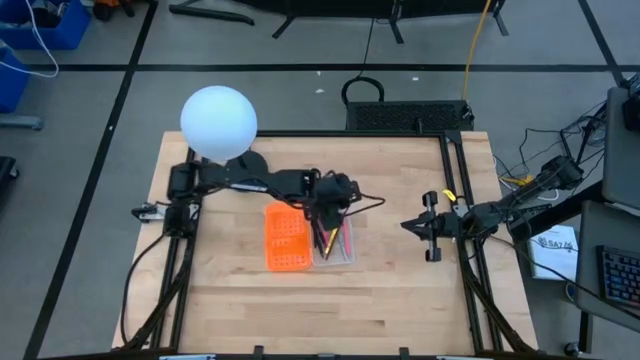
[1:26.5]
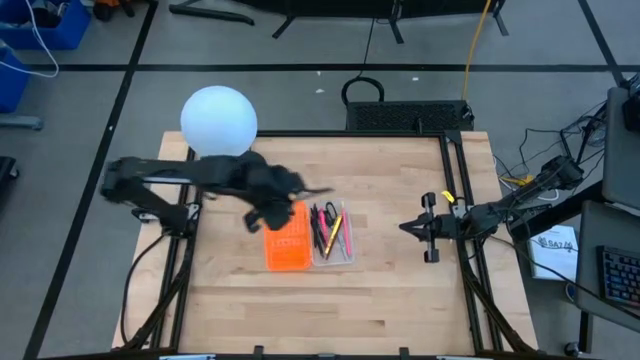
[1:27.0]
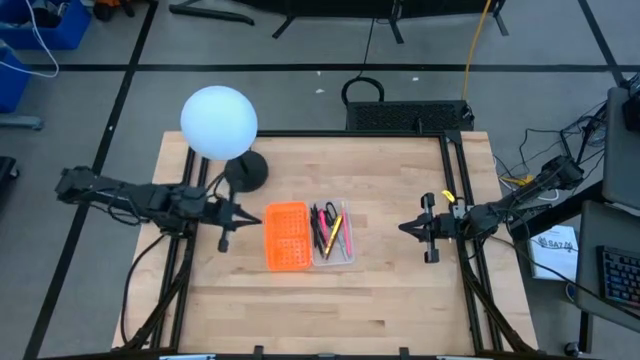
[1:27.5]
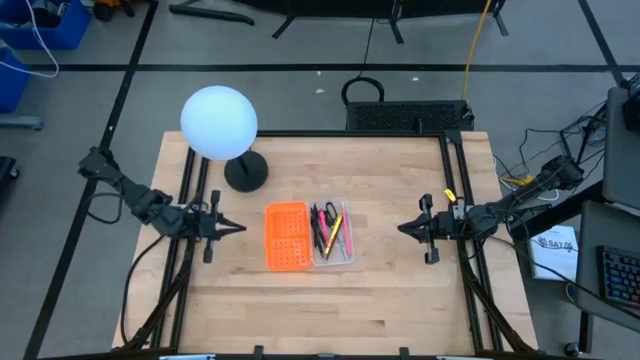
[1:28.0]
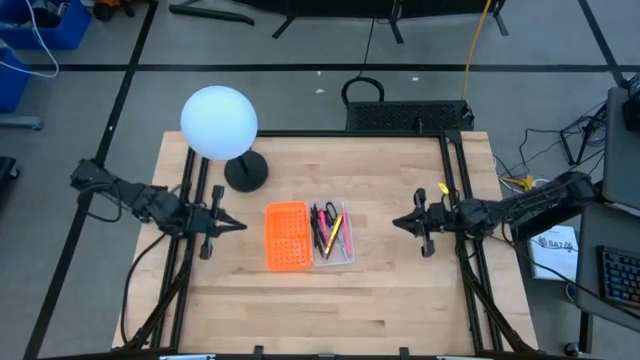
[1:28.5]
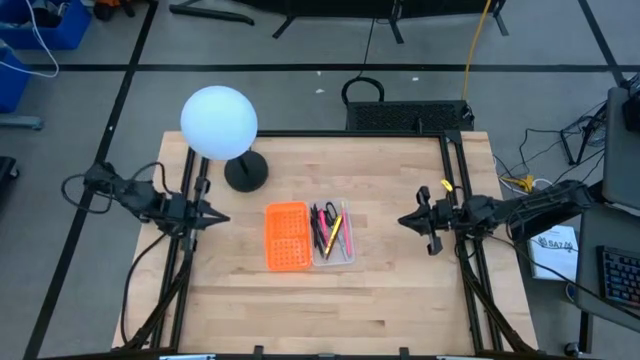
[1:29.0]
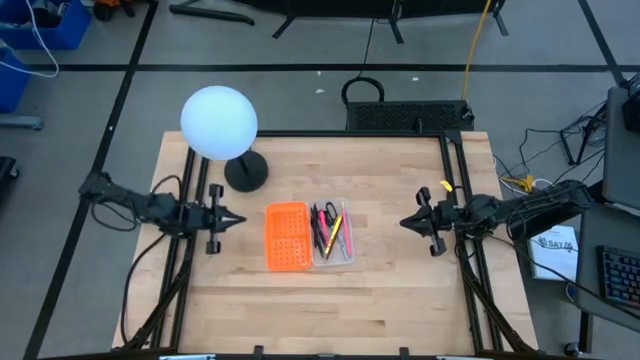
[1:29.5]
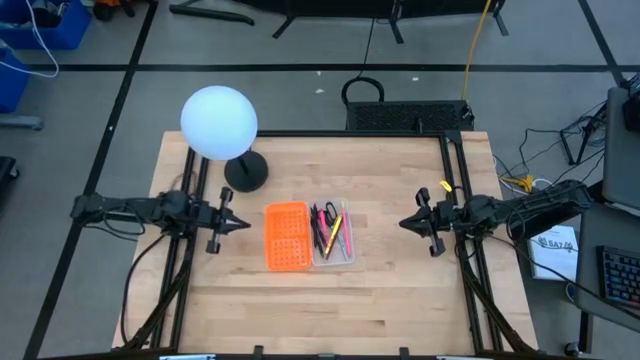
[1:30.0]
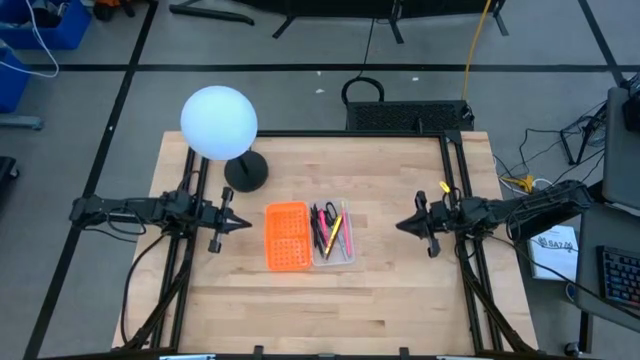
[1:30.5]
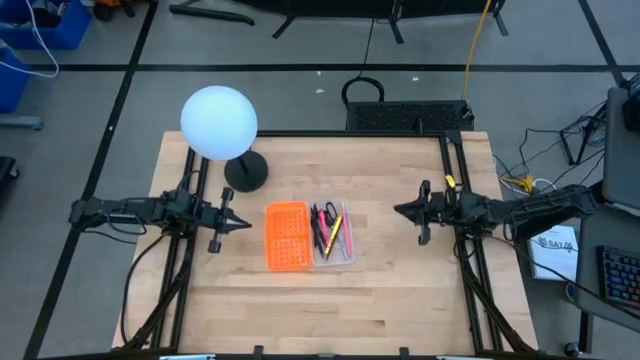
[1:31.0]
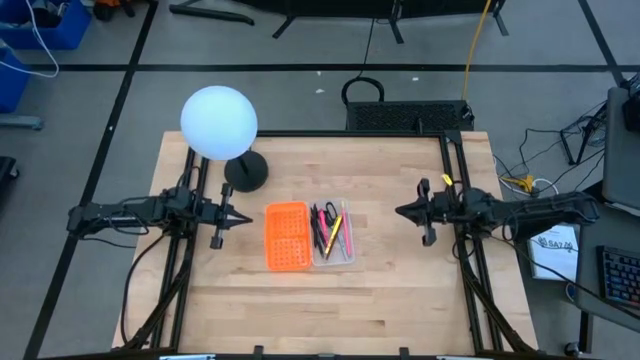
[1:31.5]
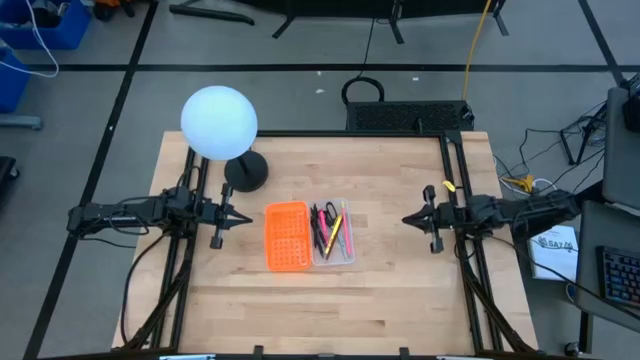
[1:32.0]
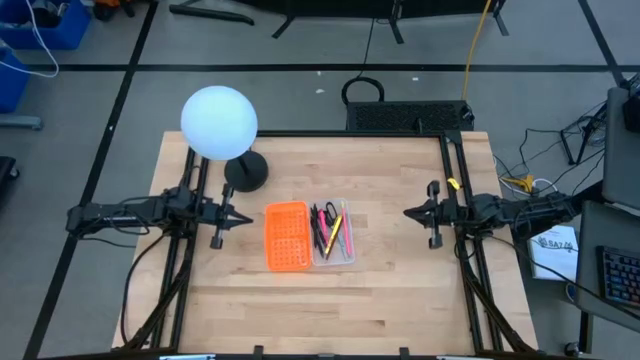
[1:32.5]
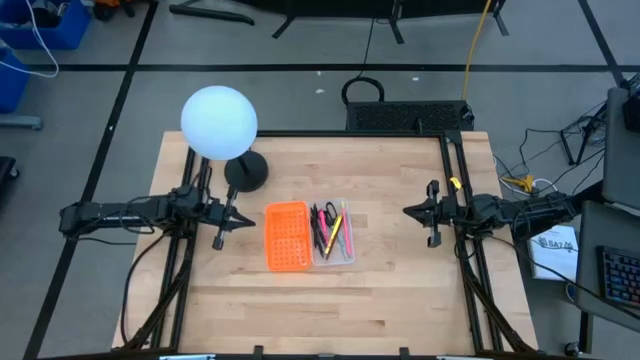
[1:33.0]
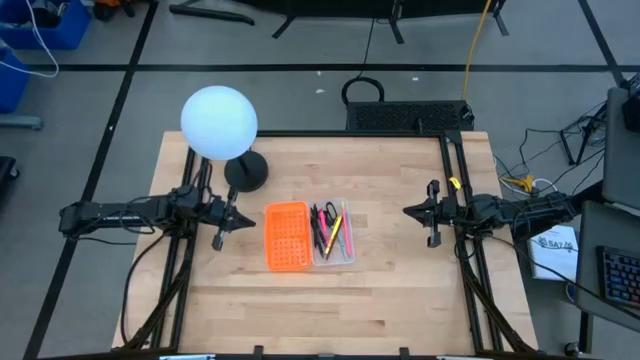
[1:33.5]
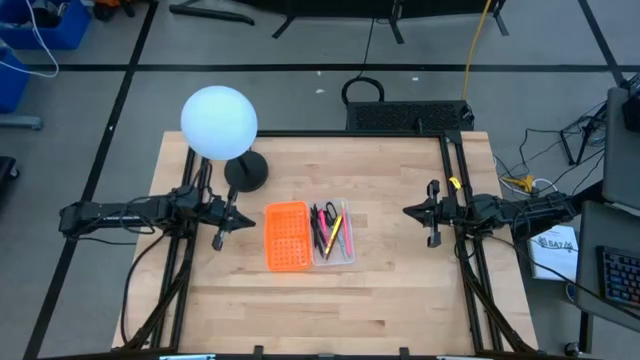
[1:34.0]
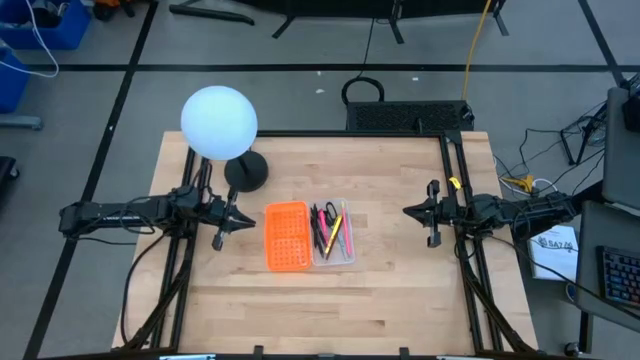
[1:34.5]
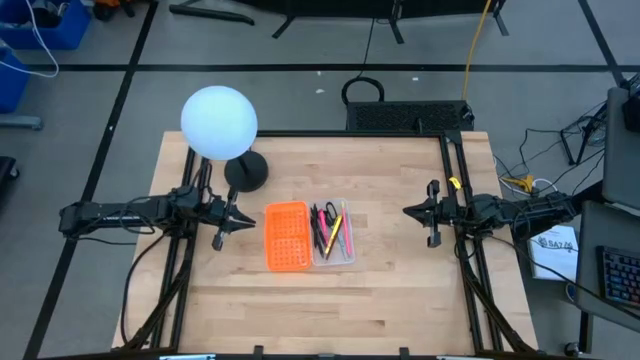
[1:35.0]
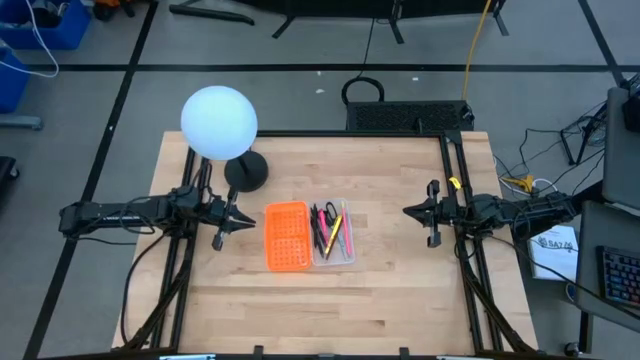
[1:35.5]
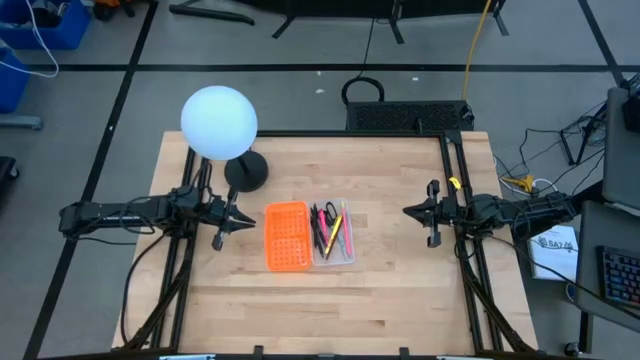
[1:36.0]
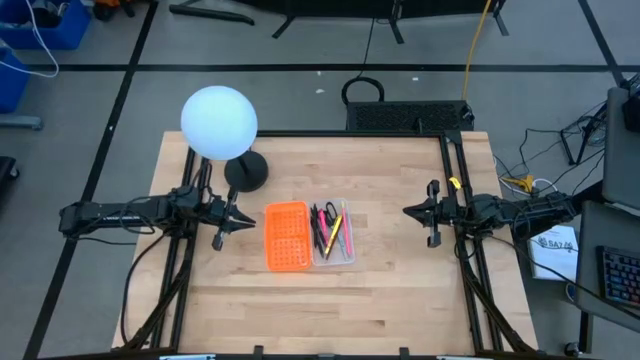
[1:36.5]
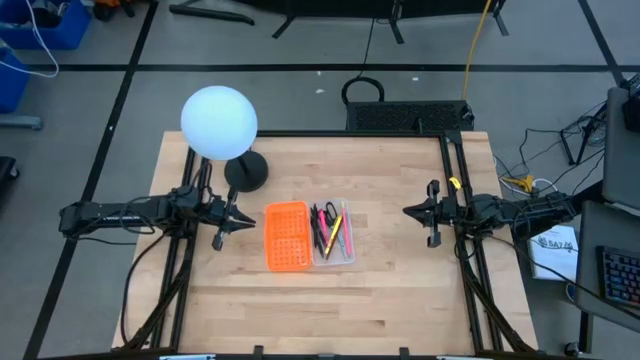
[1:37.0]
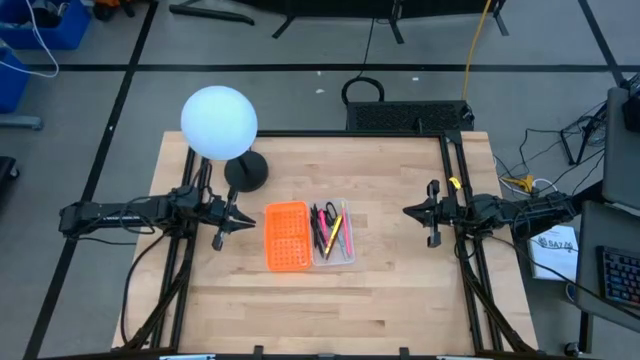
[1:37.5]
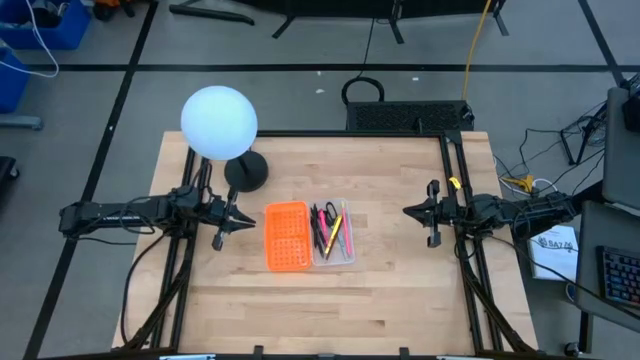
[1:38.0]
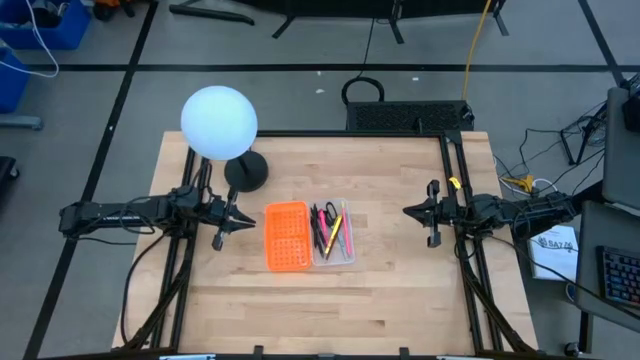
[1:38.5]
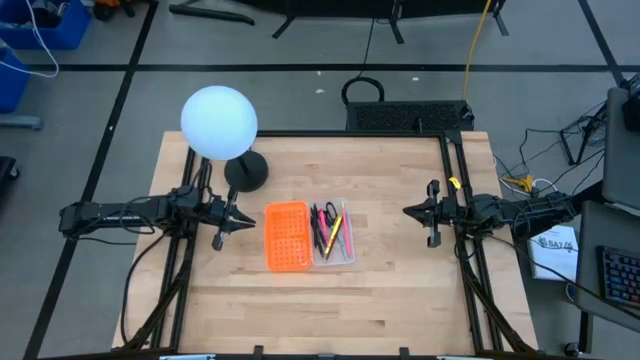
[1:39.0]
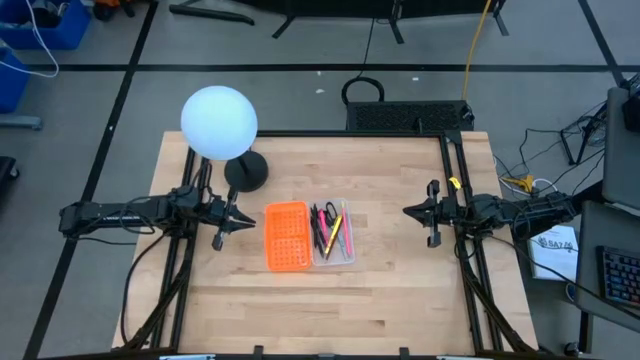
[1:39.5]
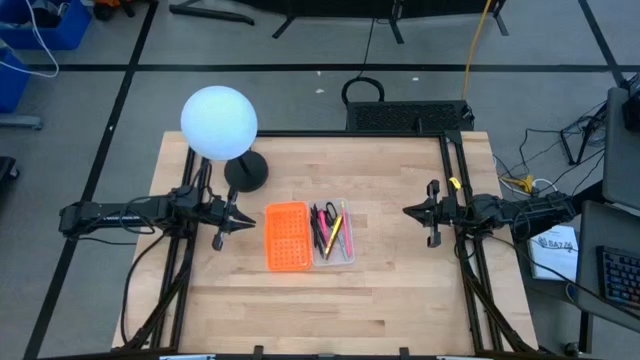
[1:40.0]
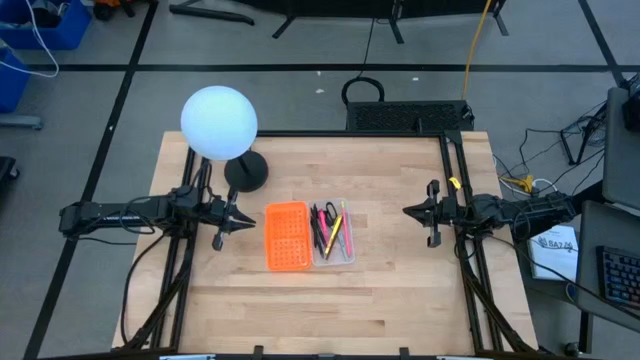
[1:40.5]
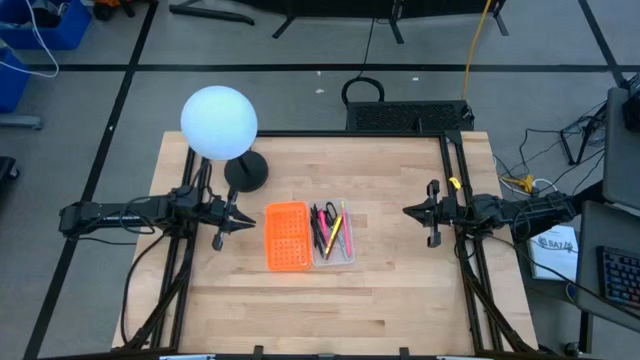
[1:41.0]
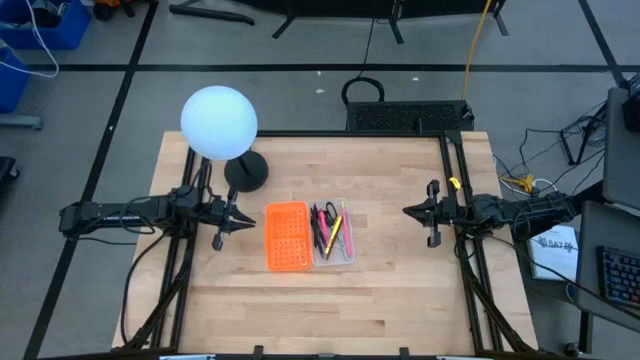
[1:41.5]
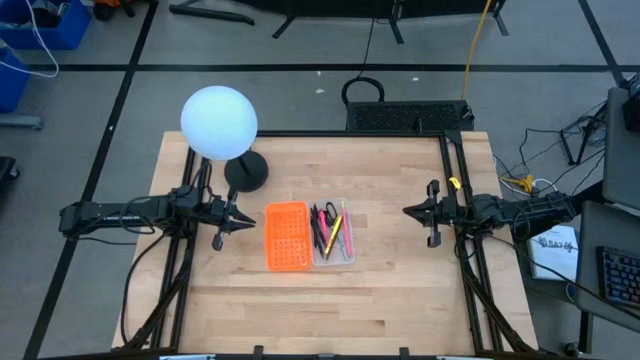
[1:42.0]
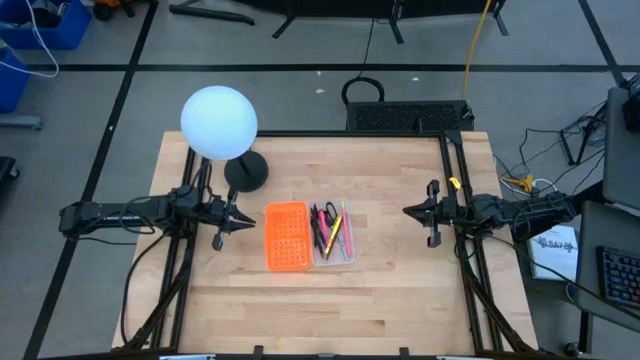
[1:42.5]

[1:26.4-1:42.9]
Task: Pick & place school supplies into a supply box
Return to Home Position
